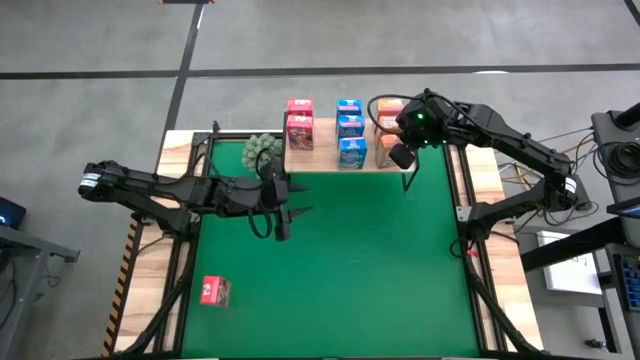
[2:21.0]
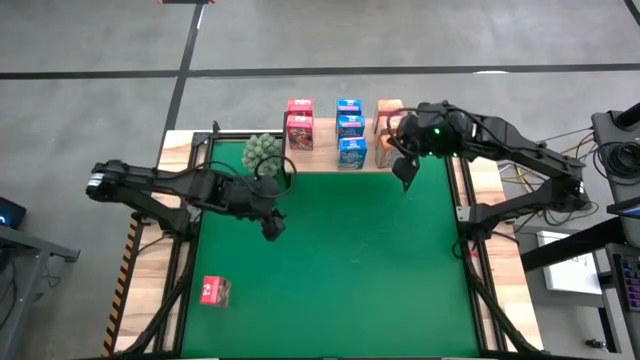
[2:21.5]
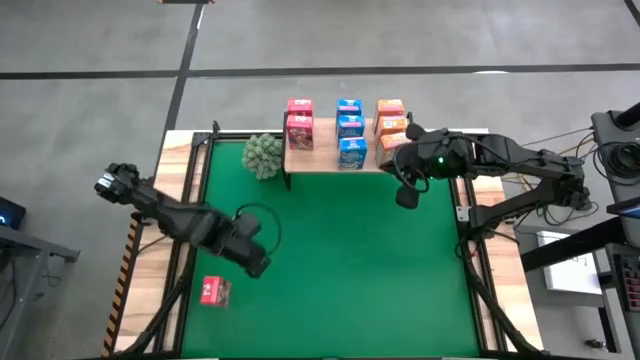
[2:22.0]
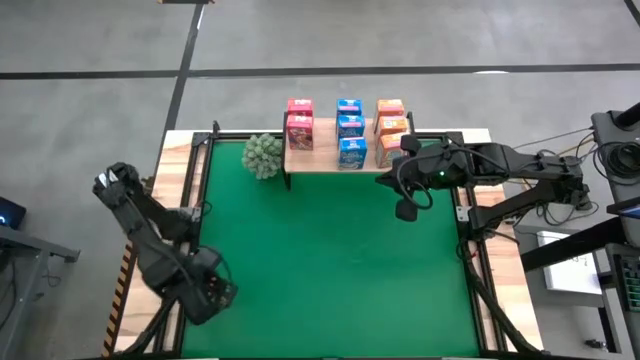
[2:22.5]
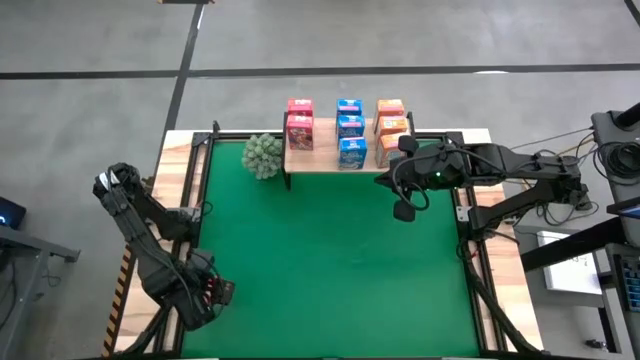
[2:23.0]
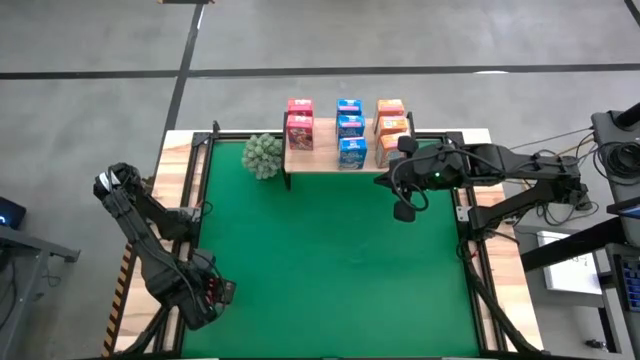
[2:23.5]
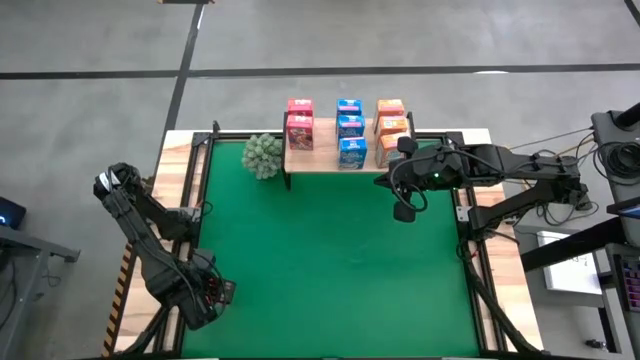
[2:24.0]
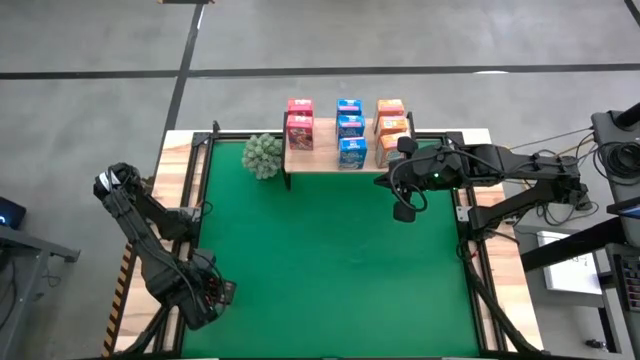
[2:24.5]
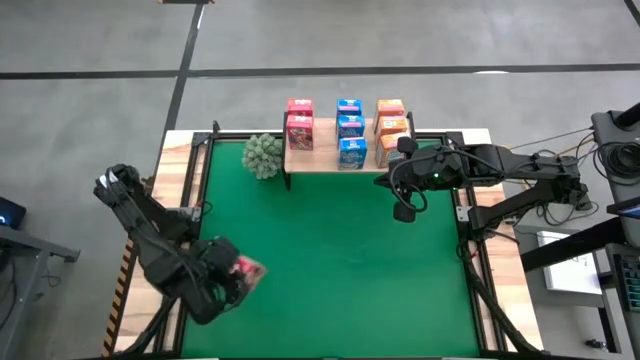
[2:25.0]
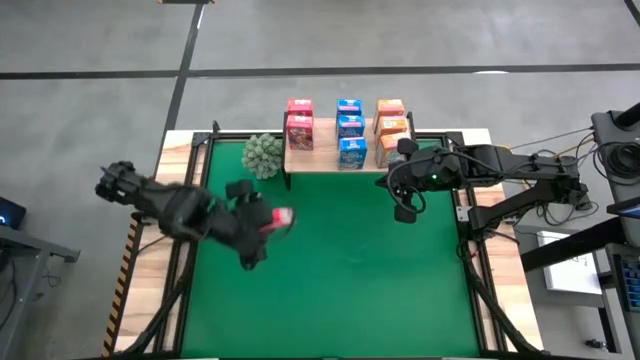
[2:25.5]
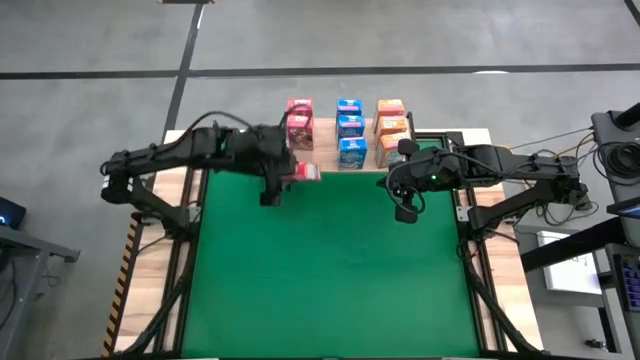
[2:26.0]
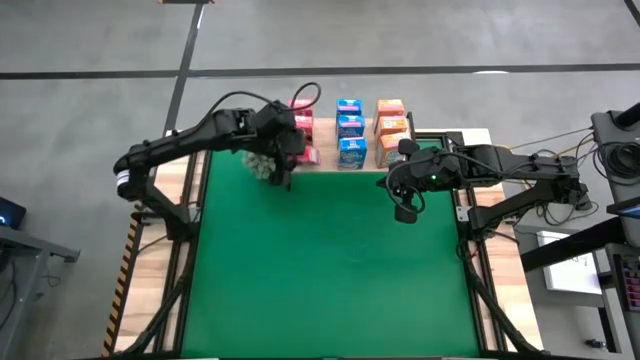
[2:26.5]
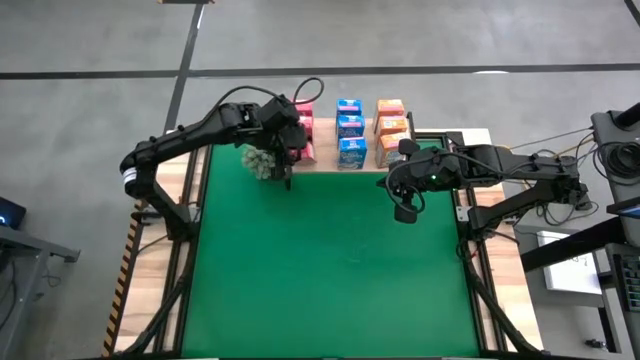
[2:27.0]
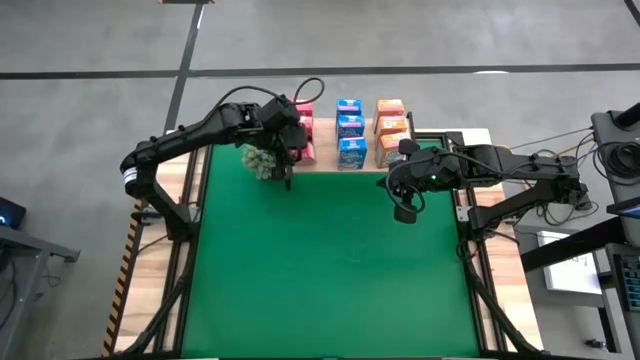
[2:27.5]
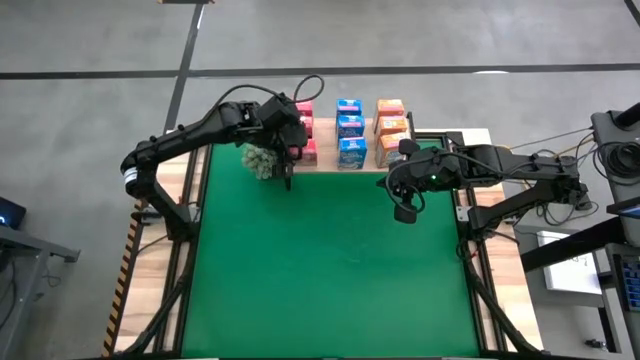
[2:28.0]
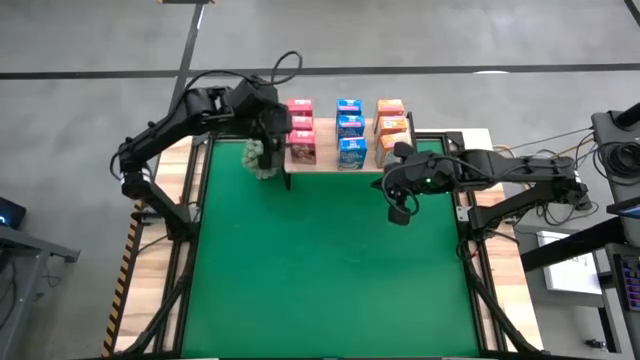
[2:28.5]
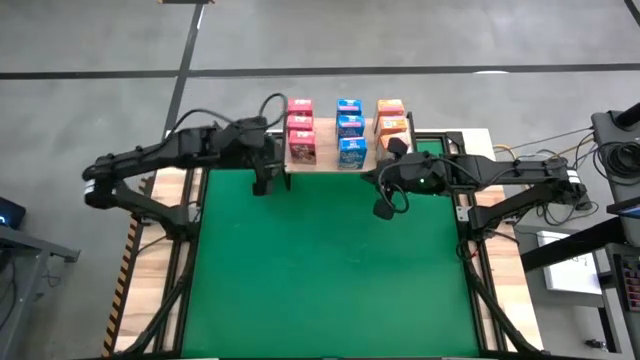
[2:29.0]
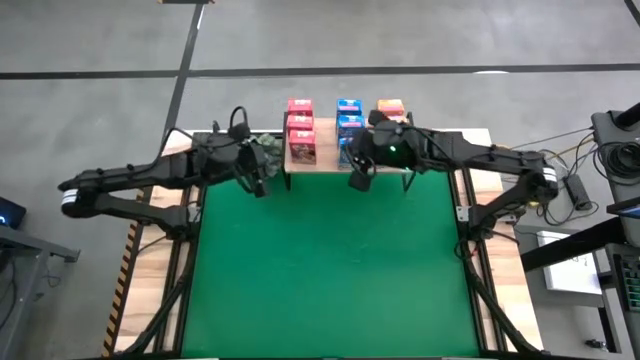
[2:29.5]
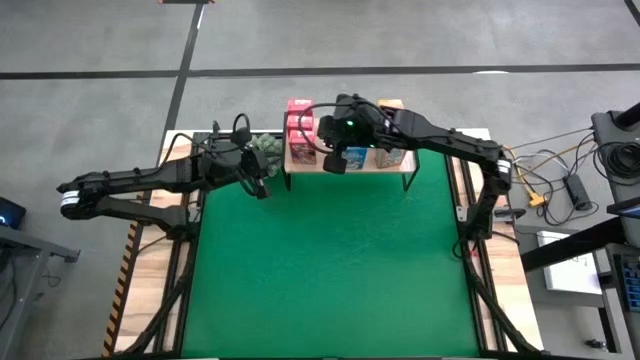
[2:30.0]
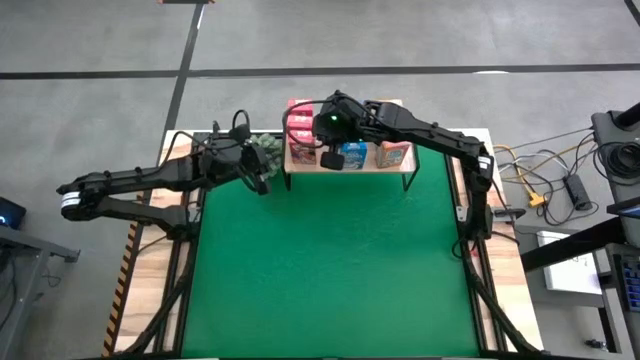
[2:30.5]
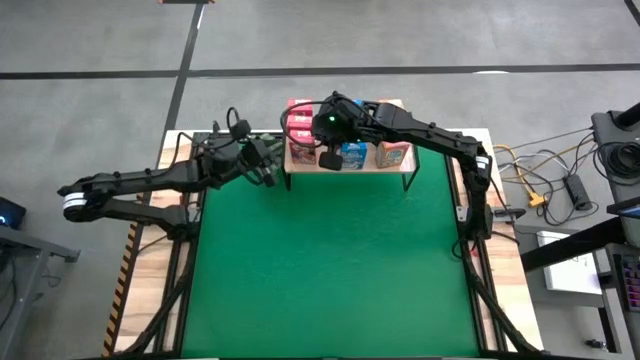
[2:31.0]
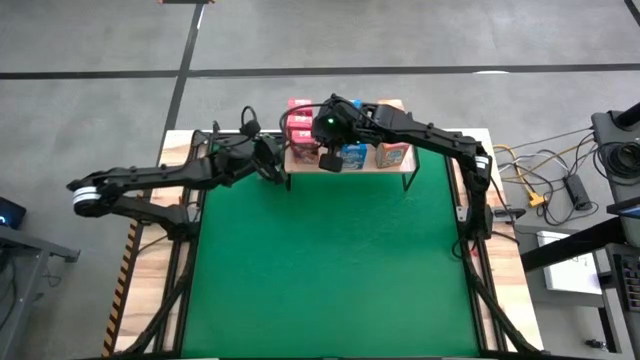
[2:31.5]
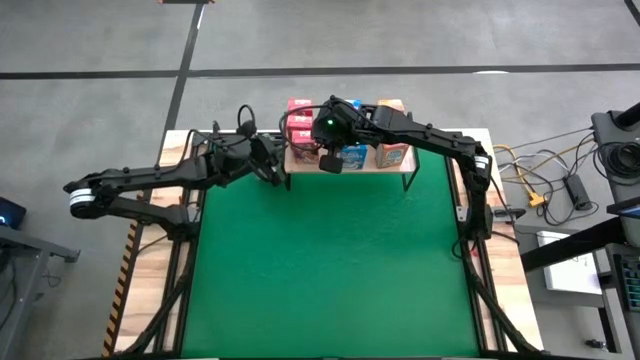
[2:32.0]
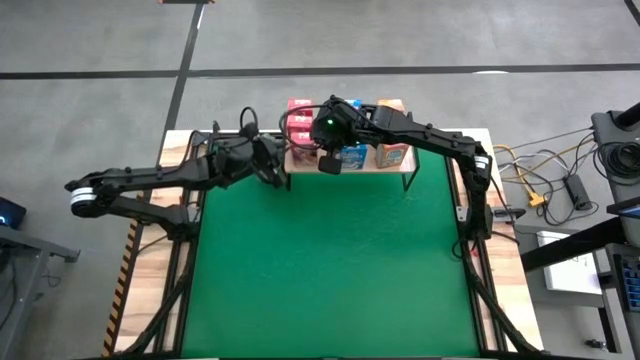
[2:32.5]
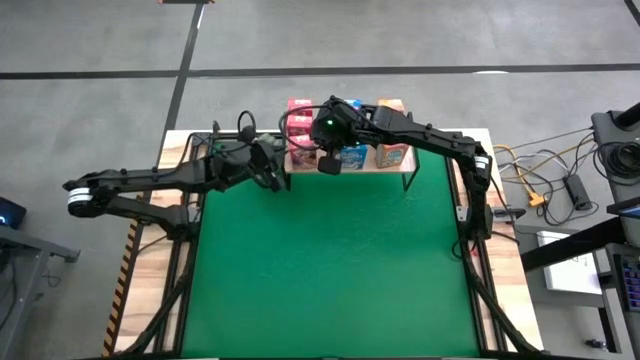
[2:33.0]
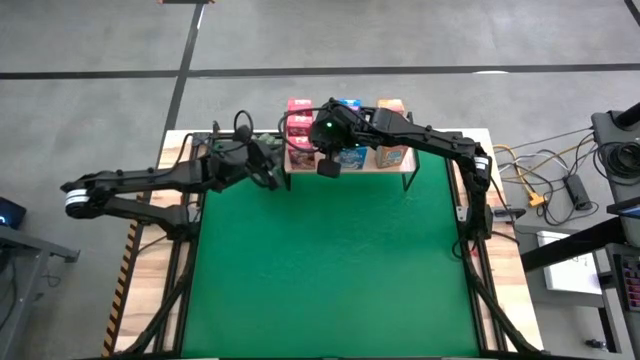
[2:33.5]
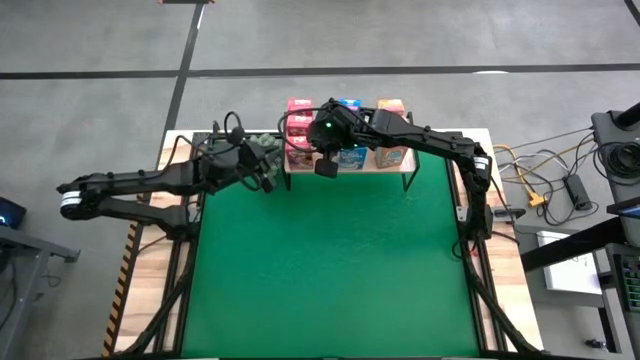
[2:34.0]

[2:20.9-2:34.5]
Task: Stack cereal on shelf
Put the red cereal box on the shelf aligned with the other red cereal box

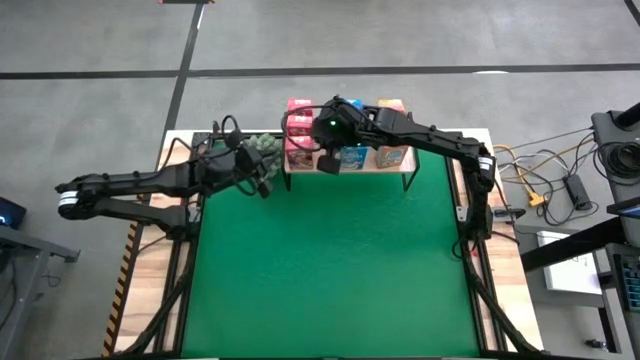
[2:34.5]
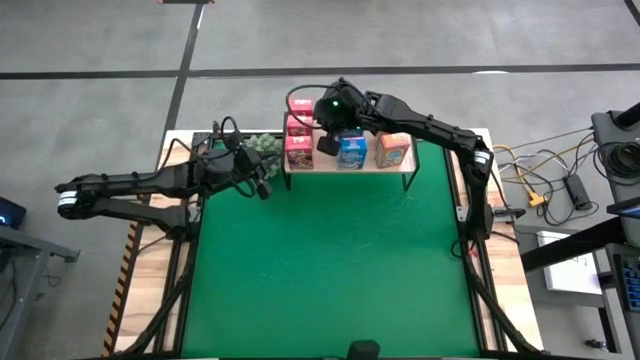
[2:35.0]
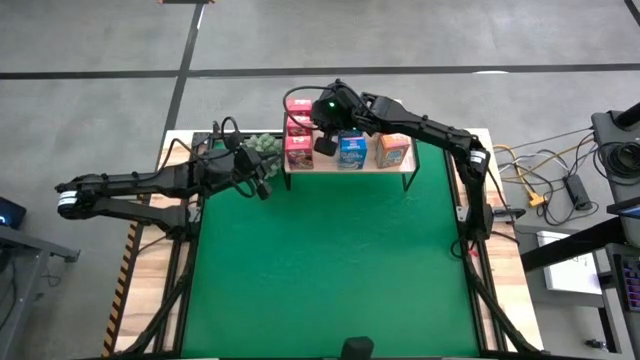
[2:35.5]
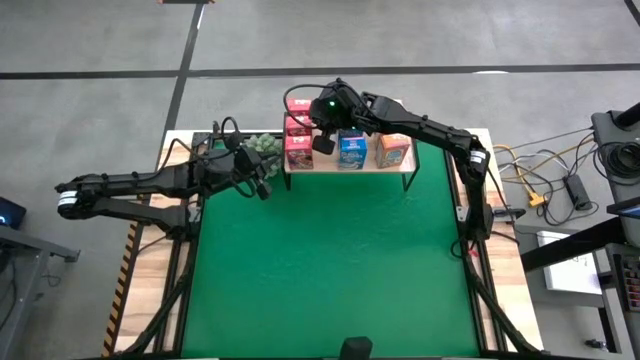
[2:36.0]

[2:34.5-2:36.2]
Adjust the middle red cereal box

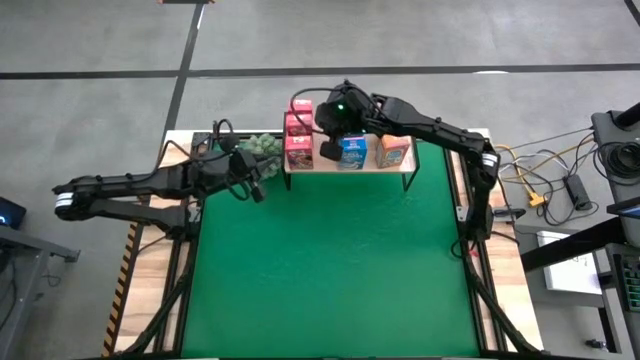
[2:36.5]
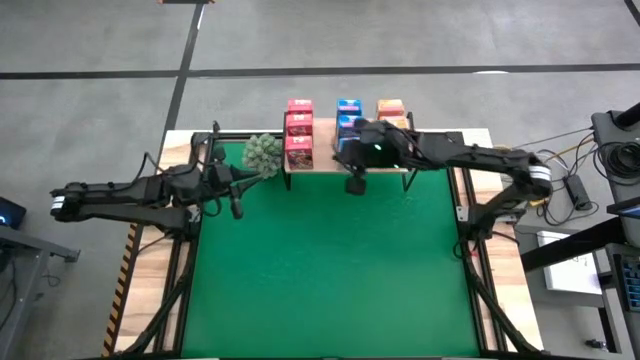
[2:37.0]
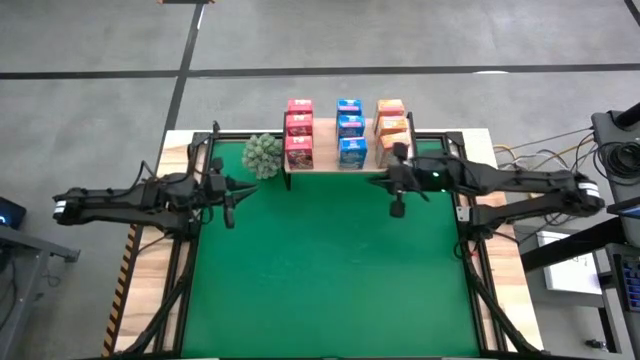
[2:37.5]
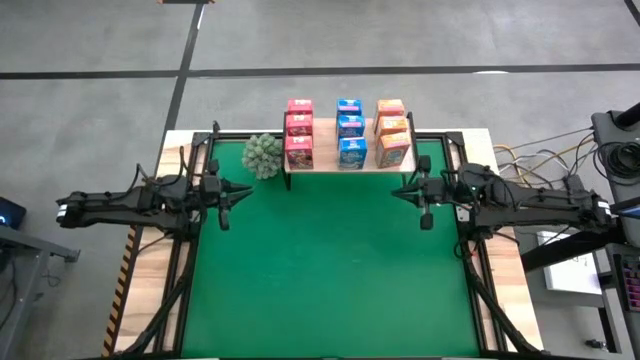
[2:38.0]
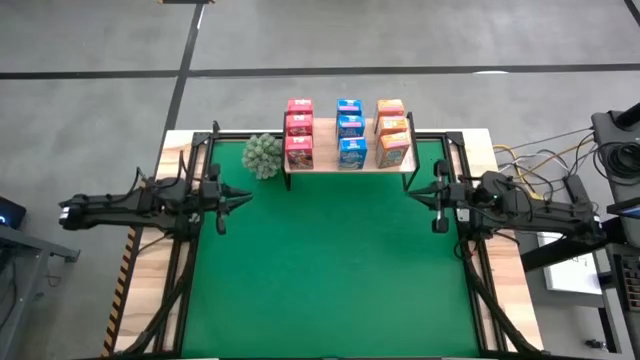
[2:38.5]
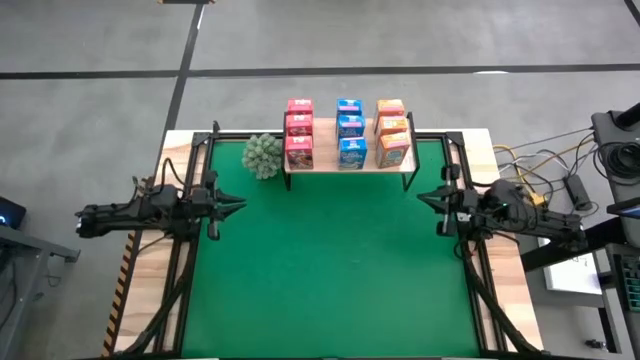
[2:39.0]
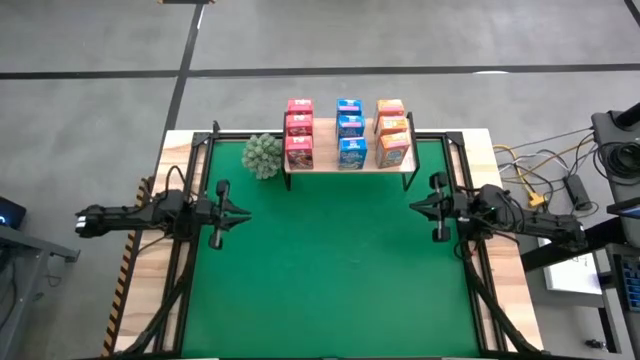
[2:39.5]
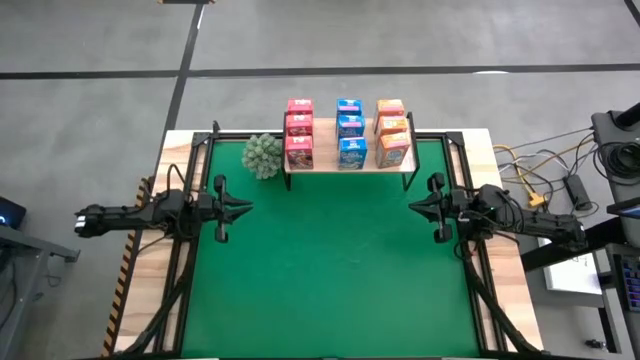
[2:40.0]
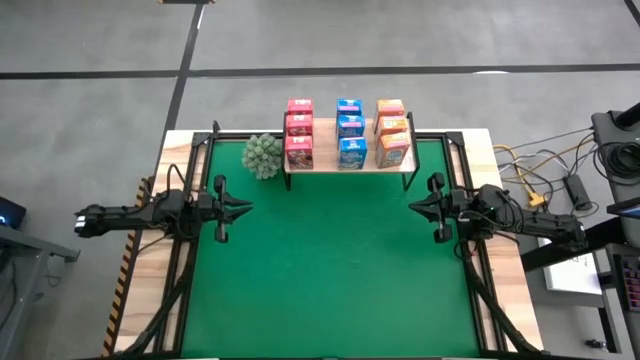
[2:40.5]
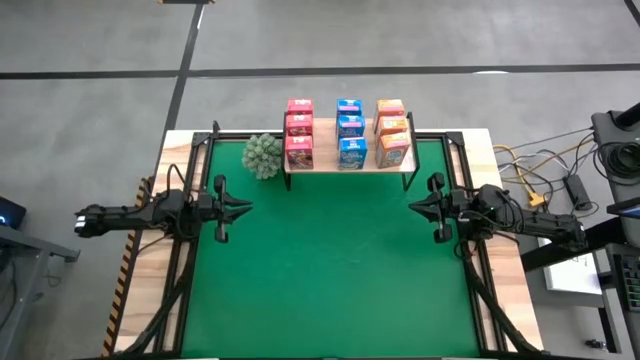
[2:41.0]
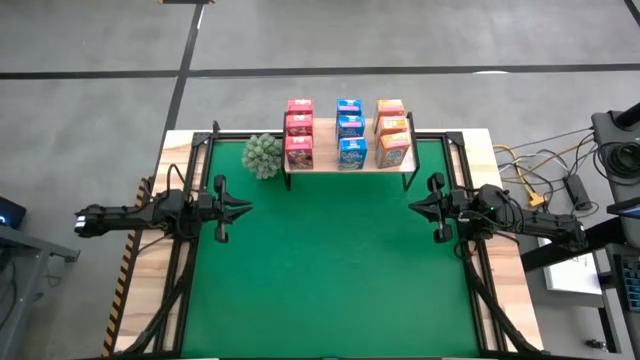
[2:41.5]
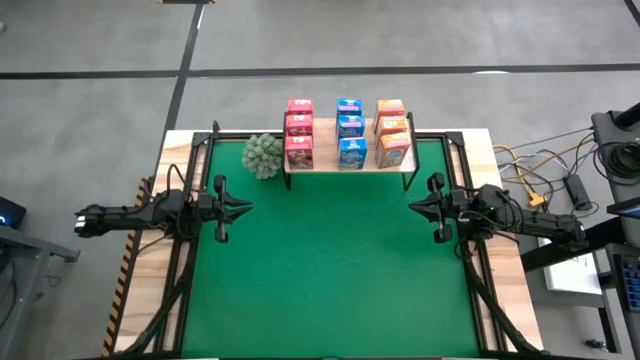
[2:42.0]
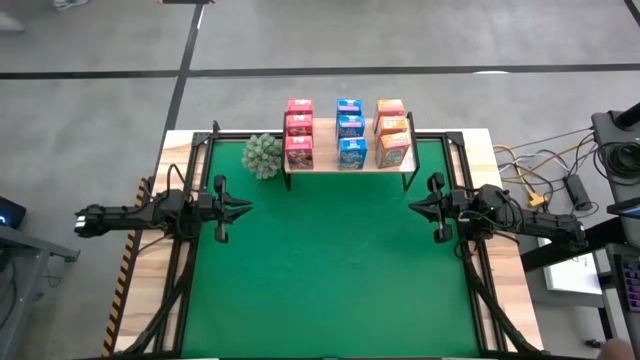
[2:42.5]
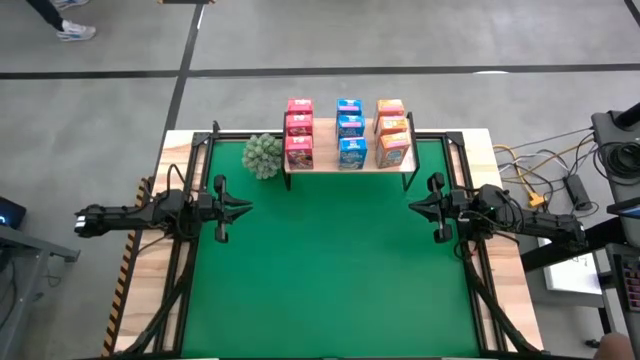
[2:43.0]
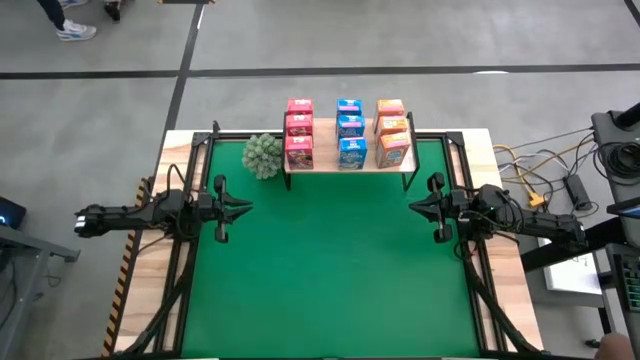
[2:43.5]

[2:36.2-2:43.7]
Return to Home Position
